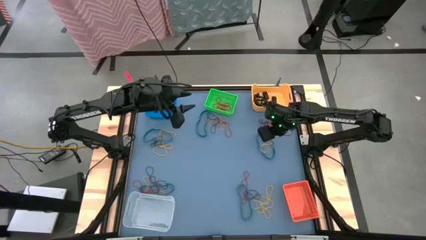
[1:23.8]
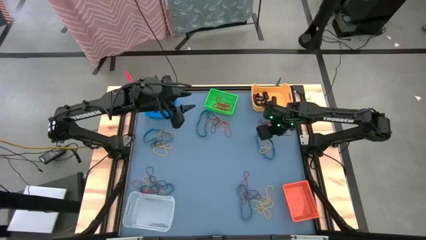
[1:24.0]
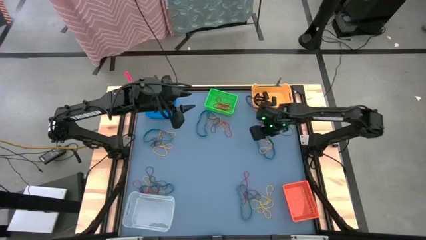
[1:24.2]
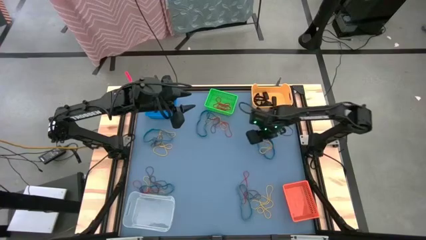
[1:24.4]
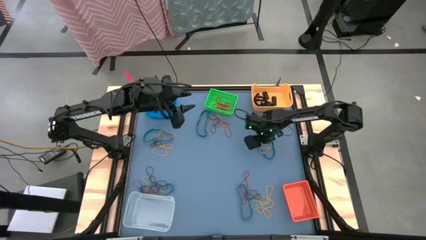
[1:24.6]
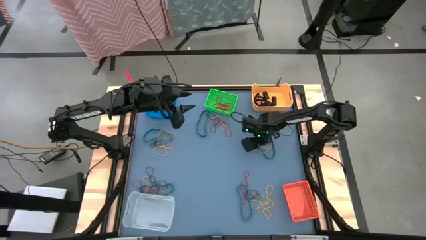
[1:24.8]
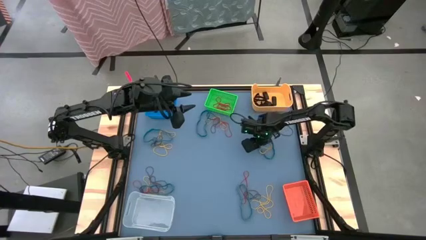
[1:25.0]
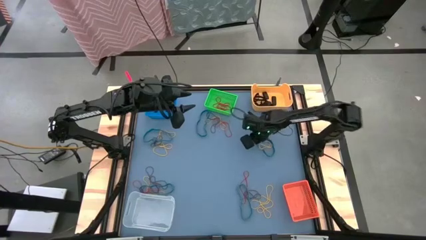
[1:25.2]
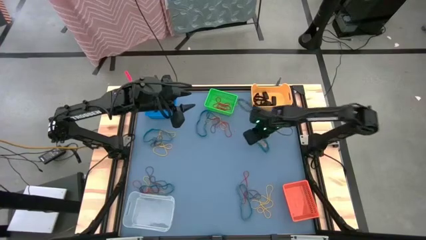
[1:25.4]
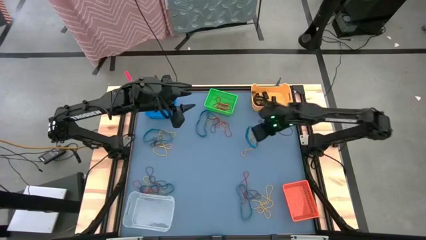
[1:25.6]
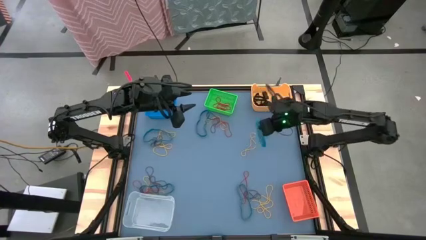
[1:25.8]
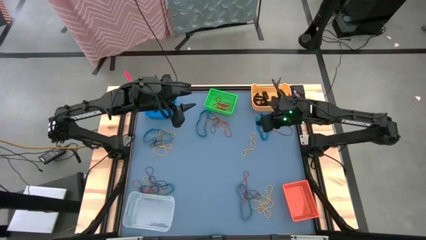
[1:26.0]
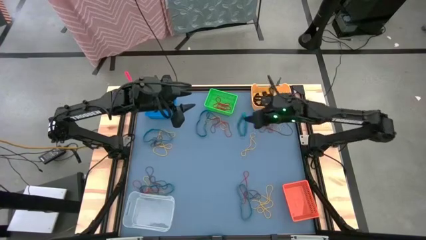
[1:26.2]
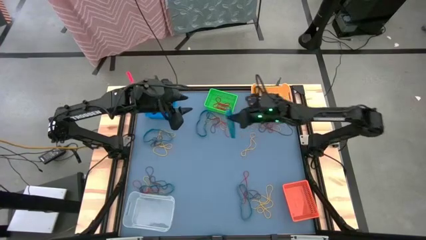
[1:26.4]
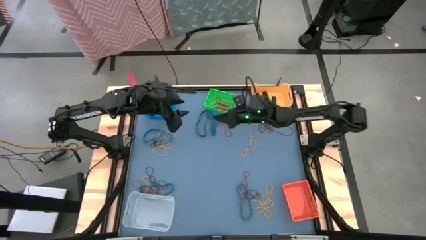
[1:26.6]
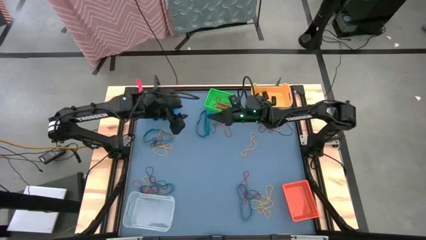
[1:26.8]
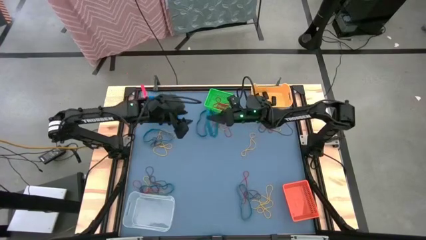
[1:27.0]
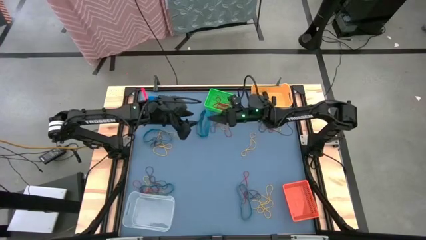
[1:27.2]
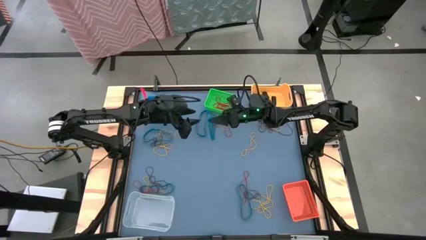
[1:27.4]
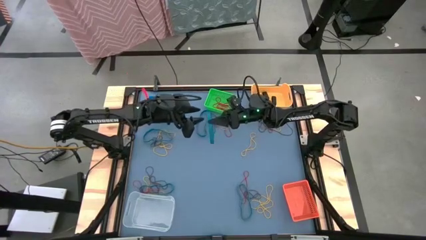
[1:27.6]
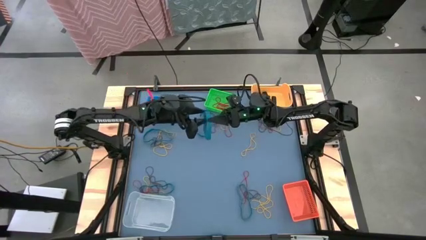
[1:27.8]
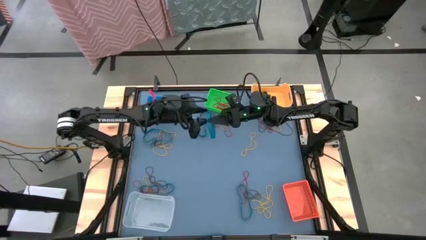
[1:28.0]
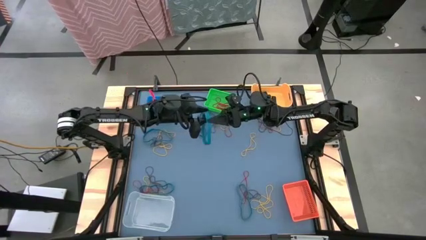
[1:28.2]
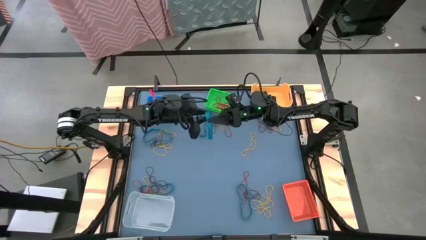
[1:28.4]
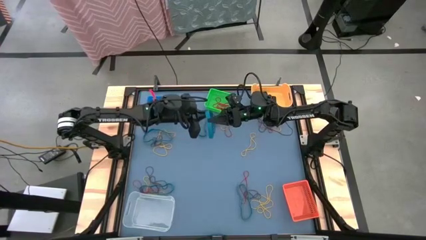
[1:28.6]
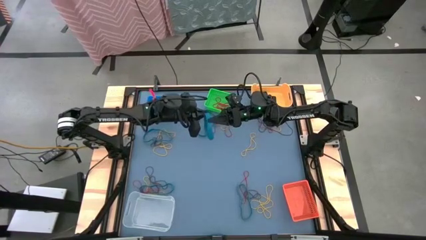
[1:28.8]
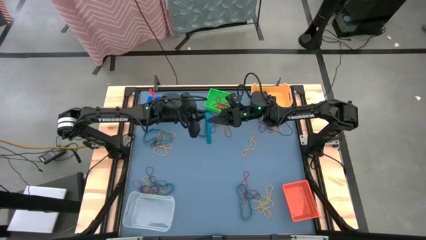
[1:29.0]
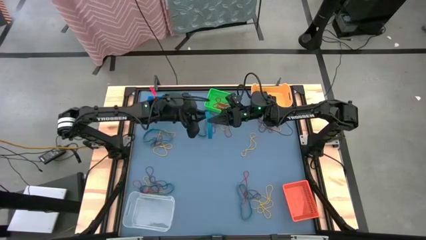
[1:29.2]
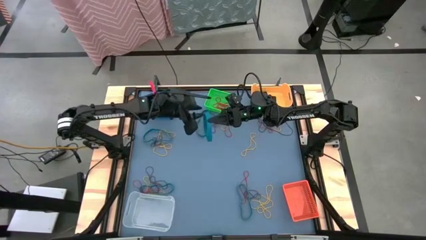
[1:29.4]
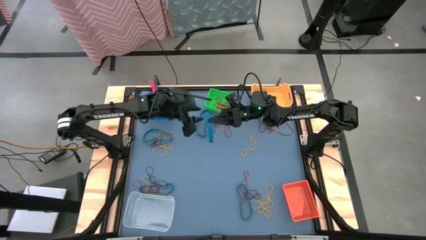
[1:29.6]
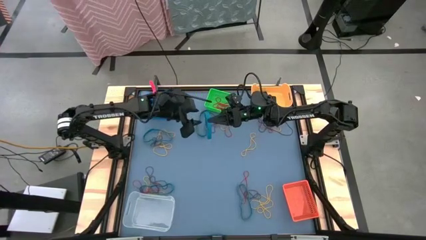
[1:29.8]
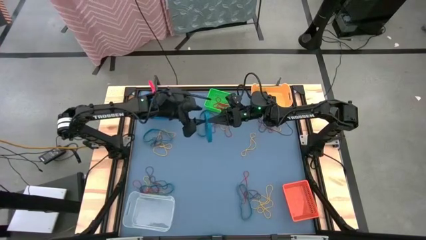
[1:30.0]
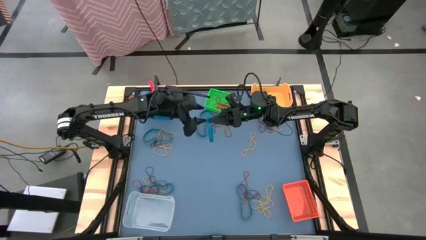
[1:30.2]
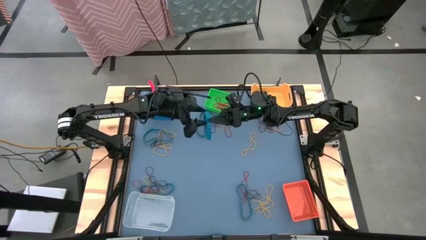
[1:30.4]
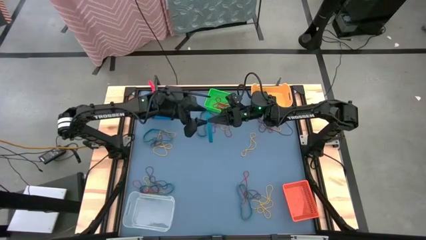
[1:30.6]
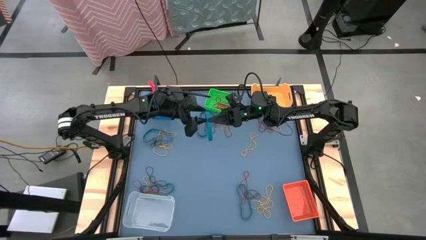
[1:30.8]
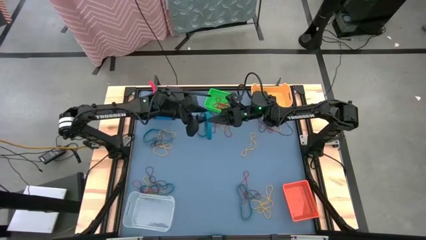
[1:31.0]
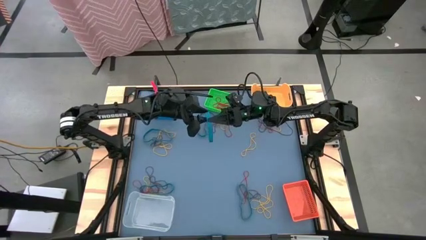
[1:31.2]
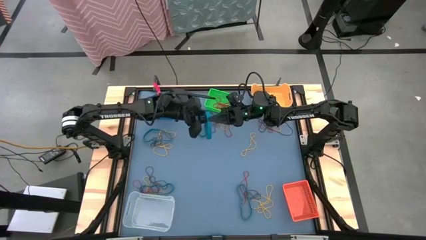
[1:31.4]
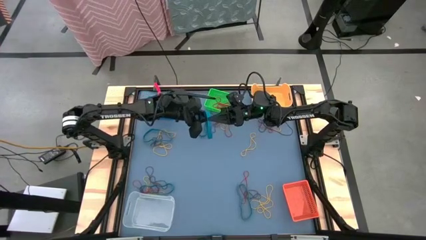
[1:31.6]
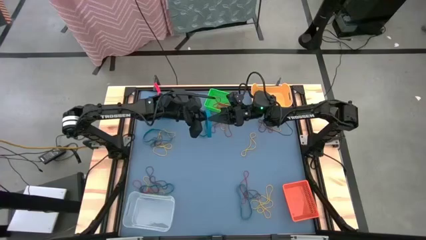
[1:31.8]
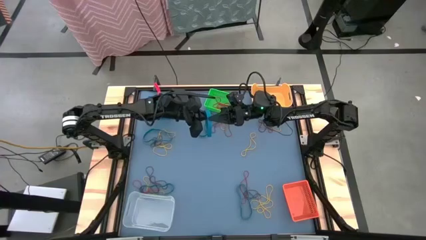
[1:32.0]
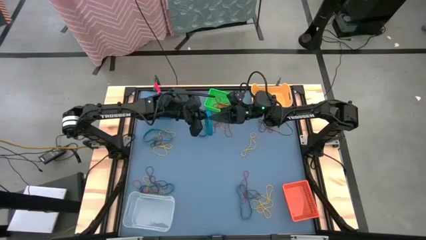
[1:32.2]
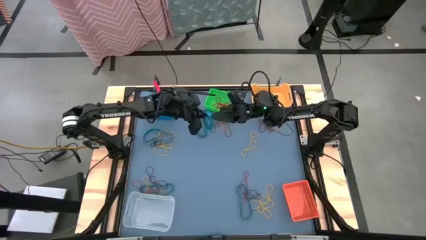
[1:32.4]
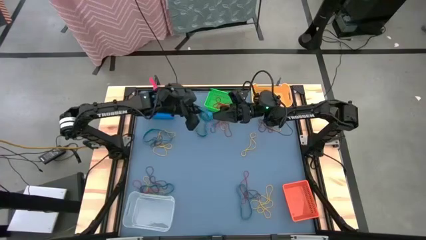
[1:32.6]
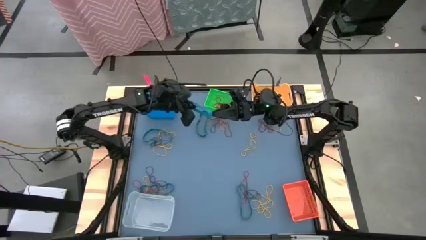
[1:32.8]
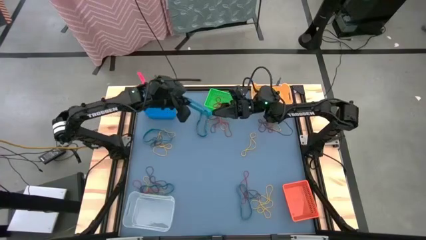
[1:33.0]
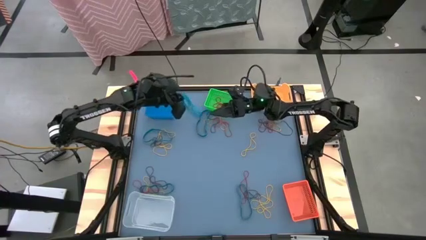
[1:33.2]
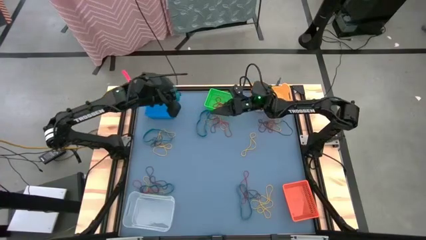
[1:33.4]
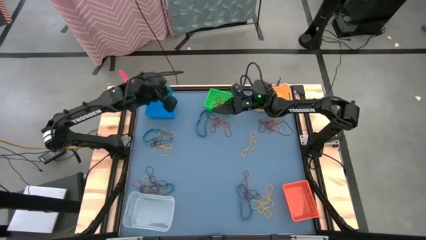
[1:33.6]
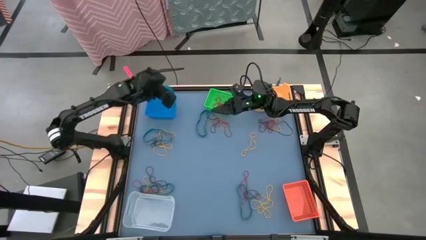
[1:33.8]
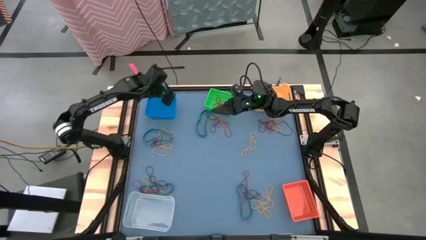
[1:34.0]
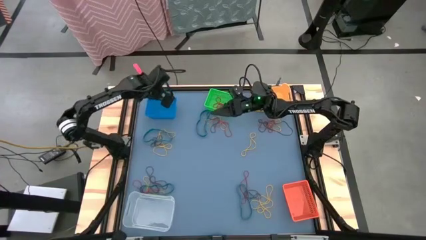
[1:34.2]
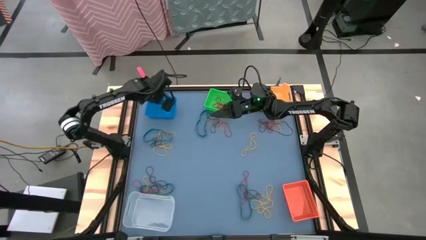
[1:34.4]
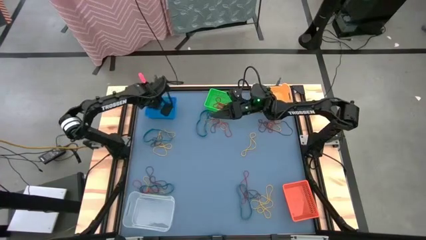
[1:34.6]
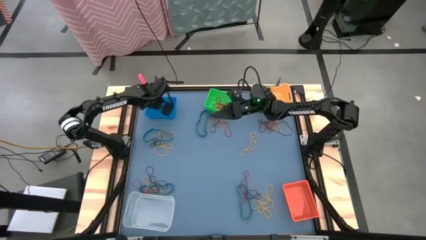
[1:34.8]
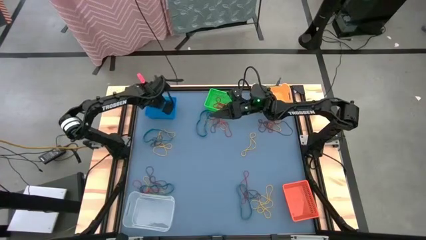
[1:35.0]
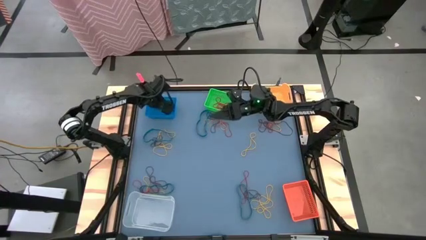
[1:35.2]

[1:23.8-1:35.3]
Task: Sort rubber bands into baskets
Put the blue rubber band into the blue bin

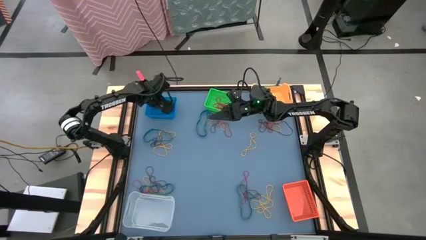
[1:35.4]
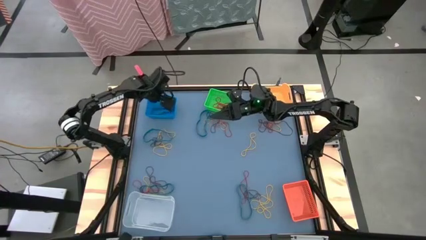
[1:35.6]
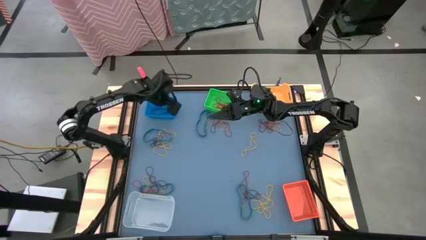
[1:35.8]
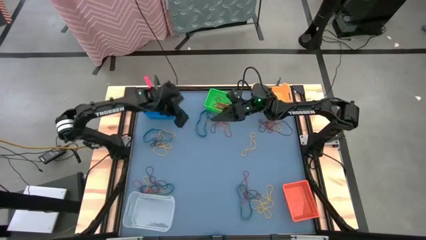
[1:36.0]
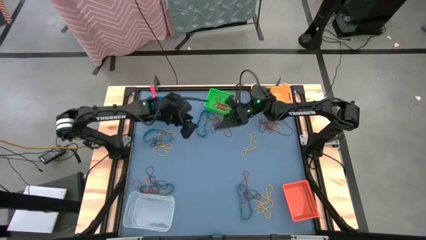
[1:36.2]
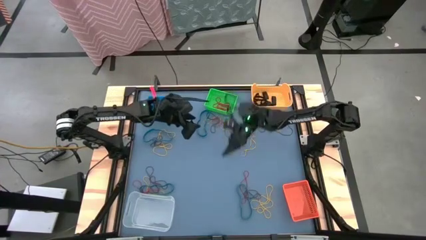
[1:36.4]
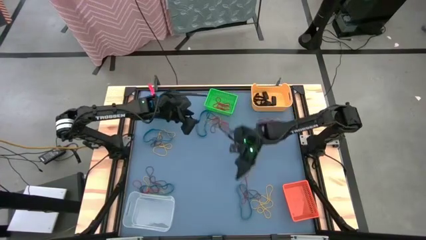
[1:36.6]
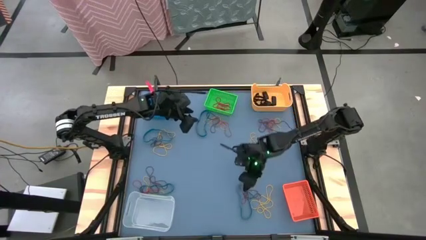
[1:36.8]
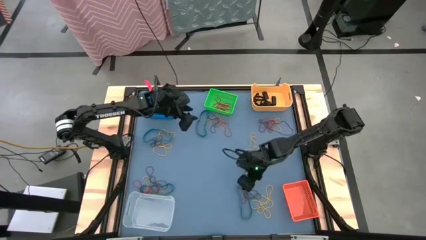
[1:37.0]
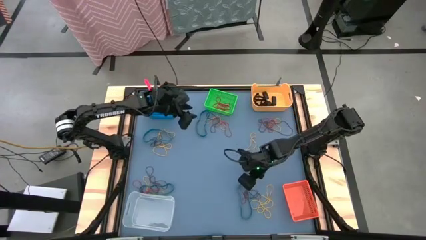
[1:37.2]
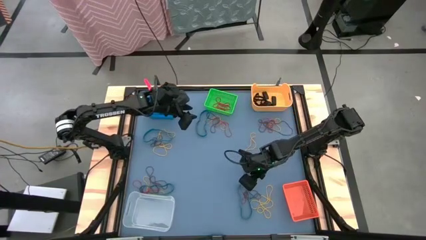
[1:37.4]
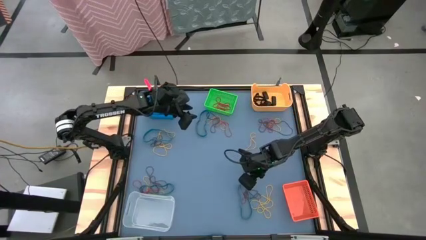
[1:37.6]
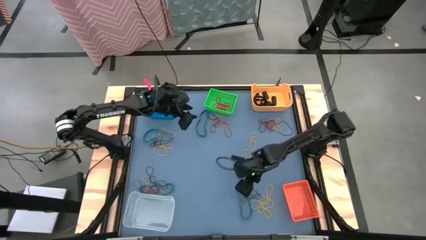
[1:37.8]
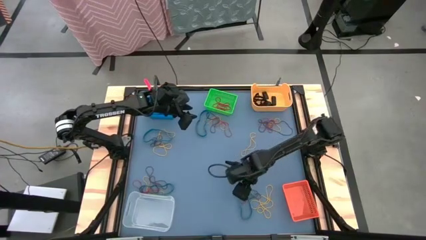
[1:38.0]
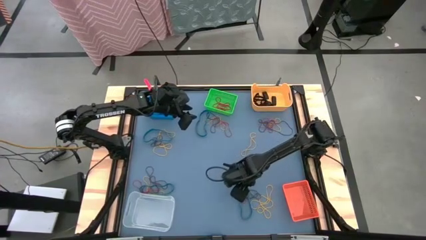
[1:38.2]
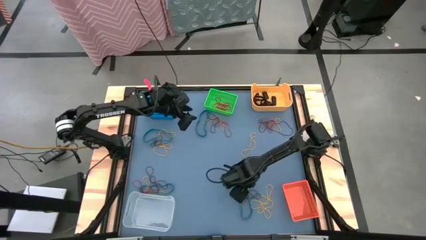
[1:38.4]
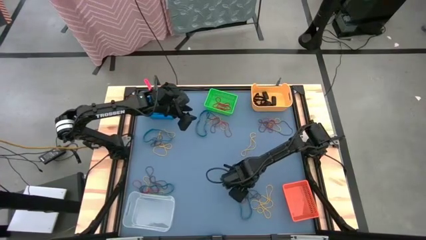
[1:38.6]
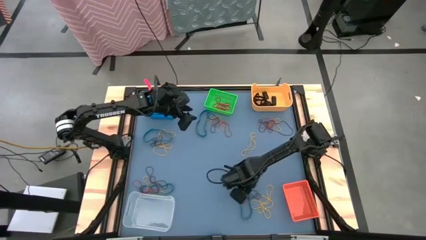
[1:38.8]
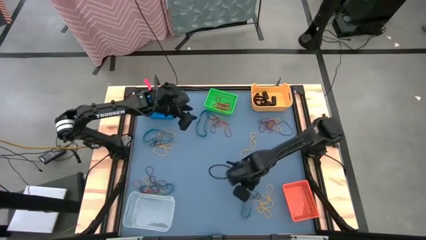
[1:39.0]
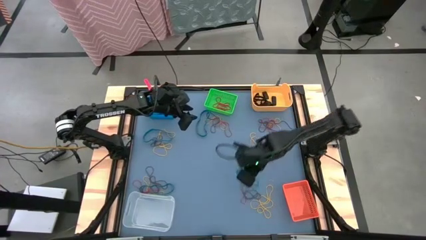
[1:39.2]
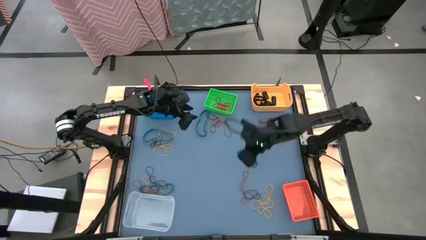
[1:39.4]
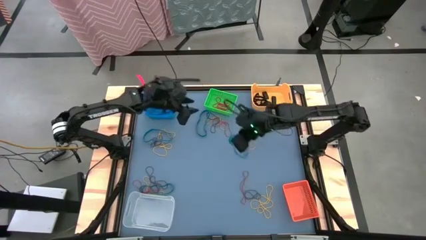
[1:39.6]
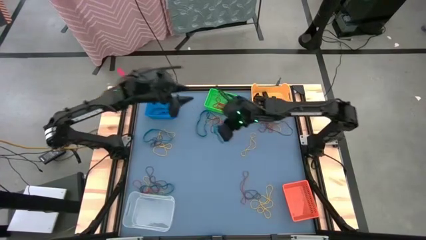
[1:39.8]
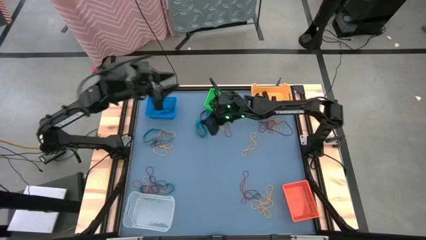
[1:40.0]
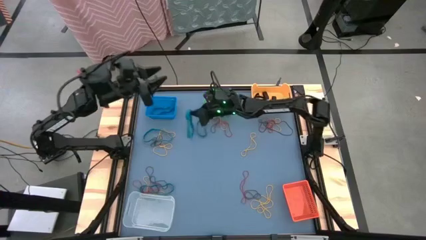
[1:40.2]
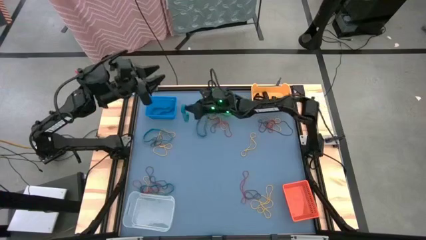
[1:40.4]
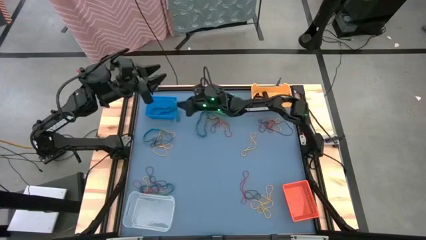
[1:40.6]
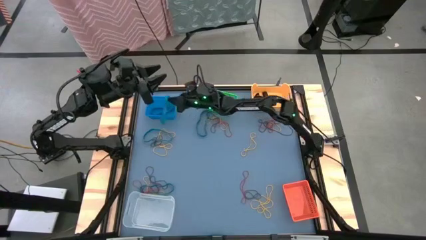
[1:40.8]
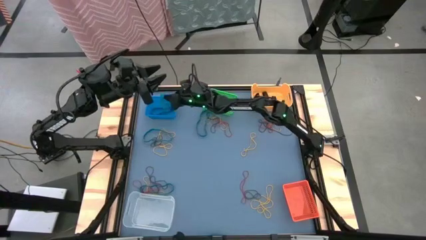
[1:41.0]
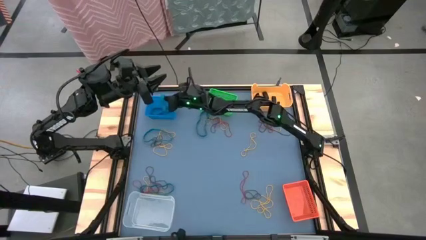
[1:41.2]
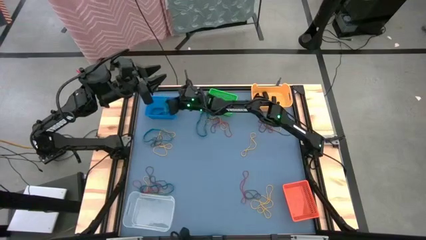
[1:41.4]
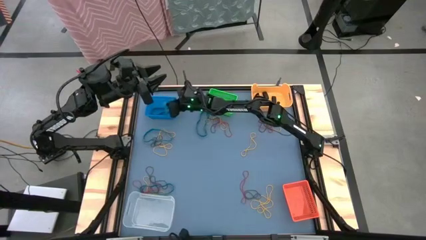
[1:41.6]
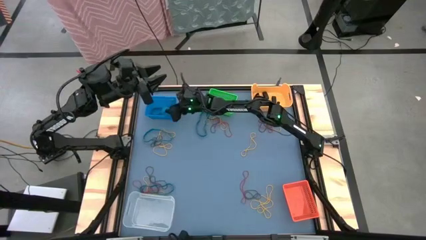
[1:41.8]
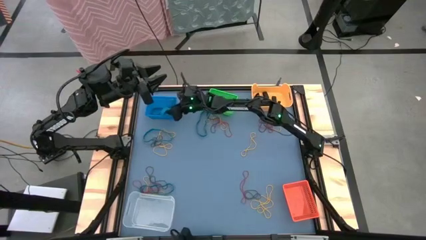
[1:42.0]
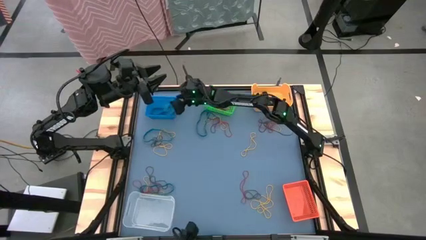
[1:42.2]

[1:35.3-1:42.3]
Put the blue rubber band into the blue bin
